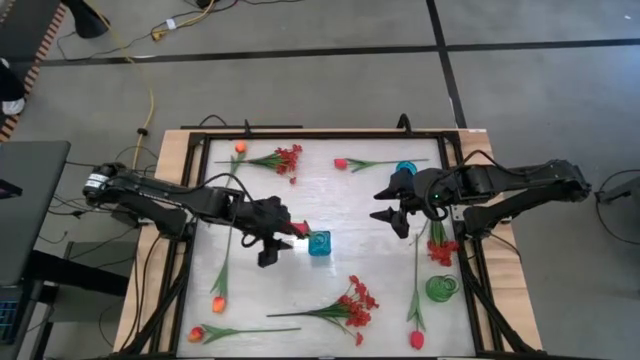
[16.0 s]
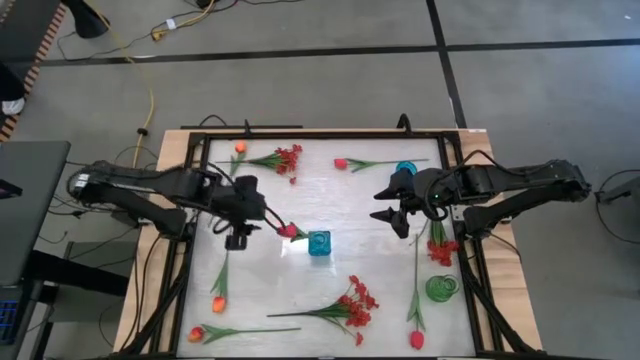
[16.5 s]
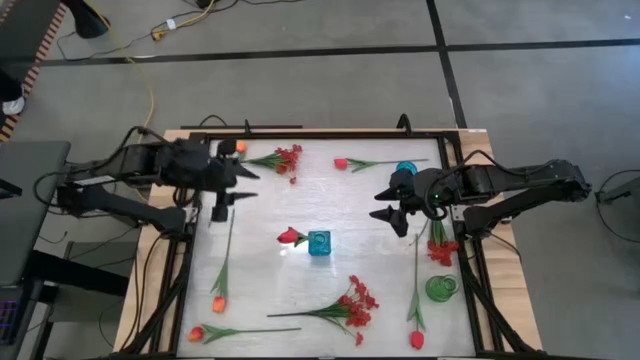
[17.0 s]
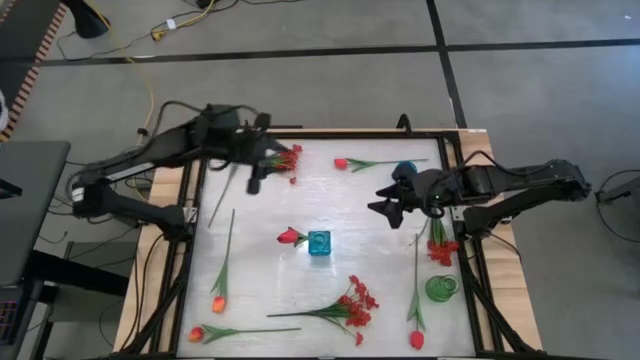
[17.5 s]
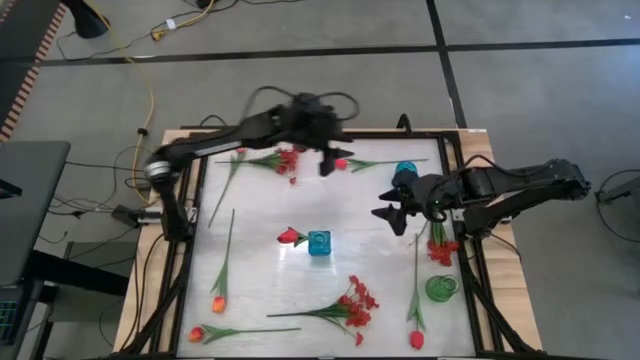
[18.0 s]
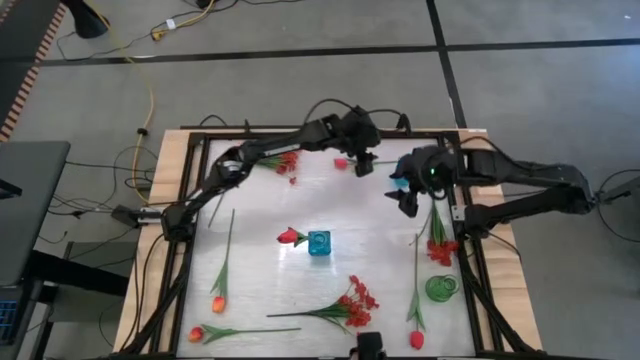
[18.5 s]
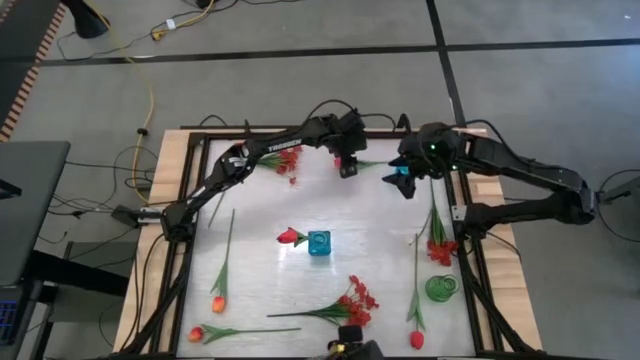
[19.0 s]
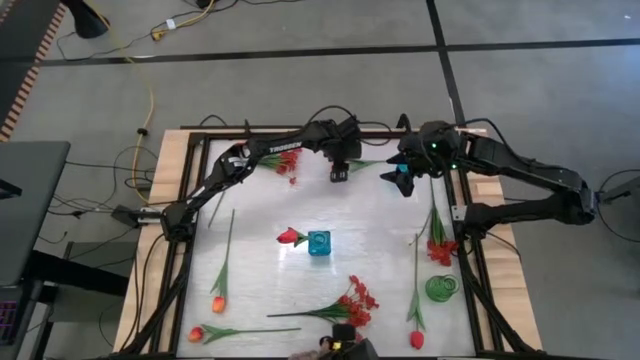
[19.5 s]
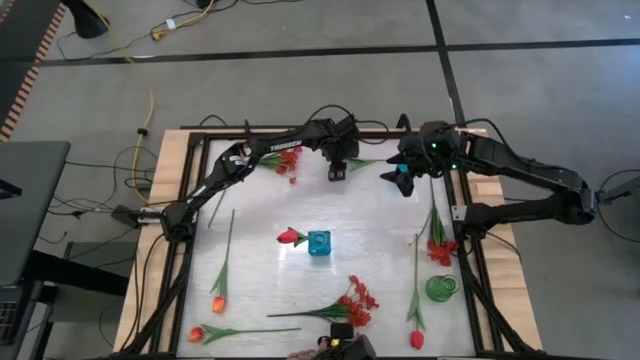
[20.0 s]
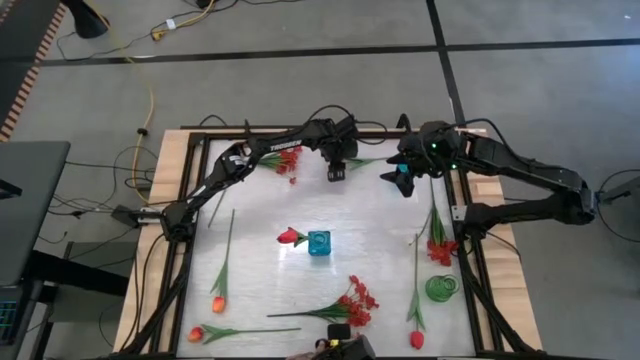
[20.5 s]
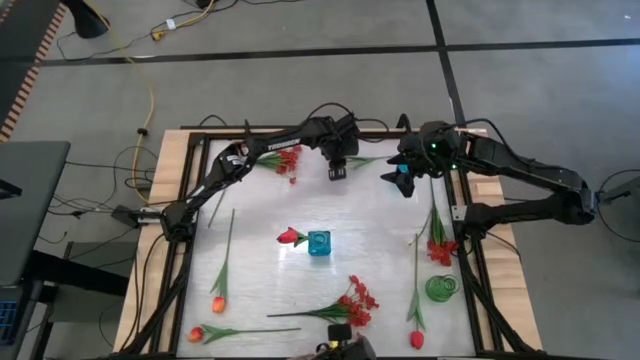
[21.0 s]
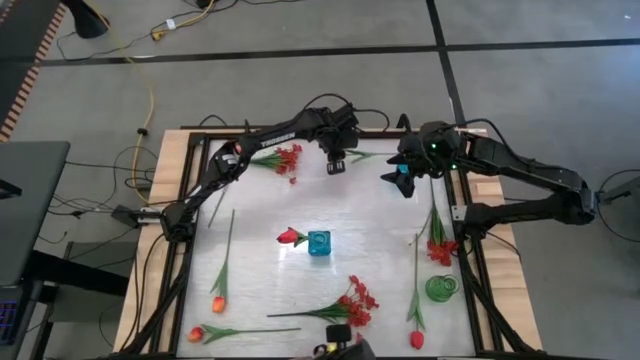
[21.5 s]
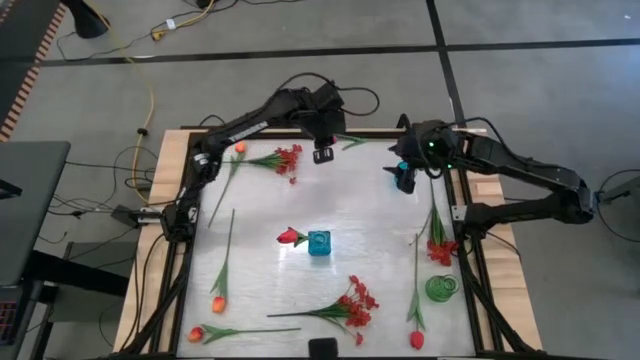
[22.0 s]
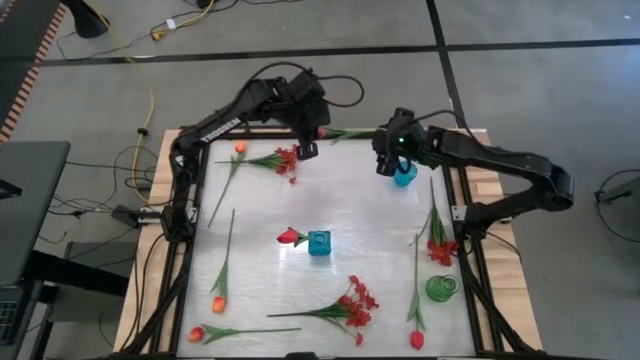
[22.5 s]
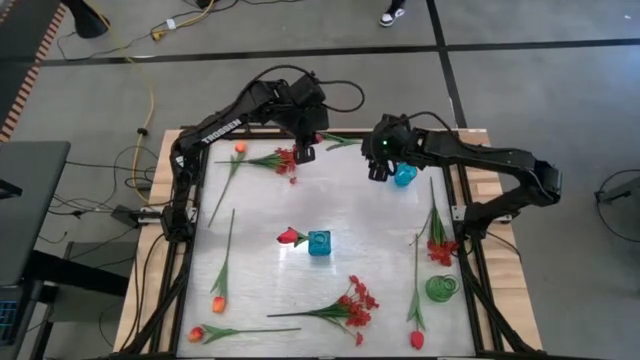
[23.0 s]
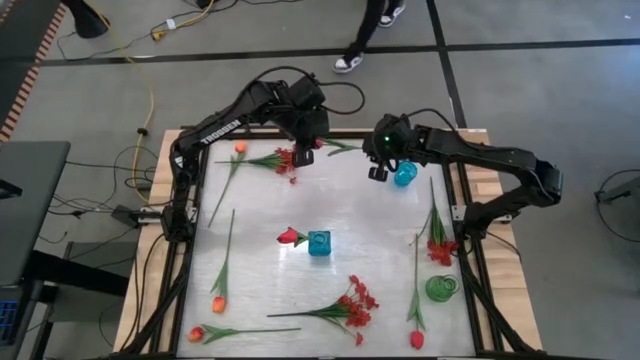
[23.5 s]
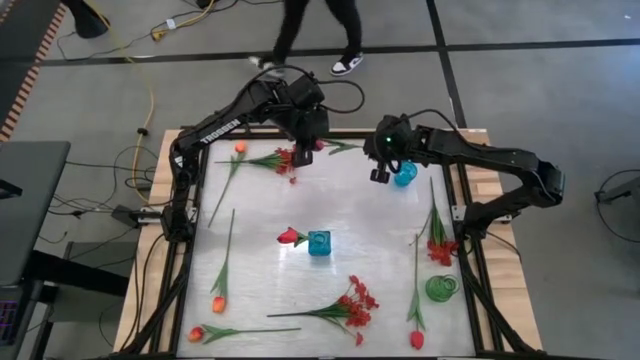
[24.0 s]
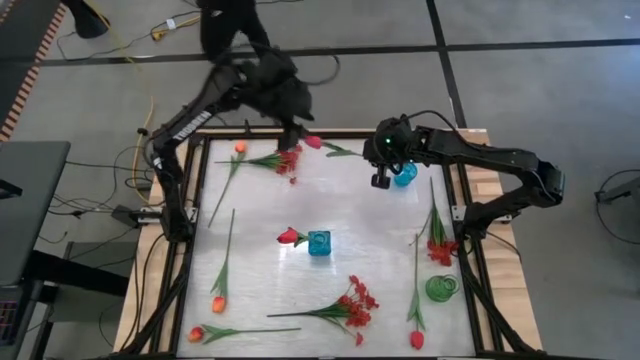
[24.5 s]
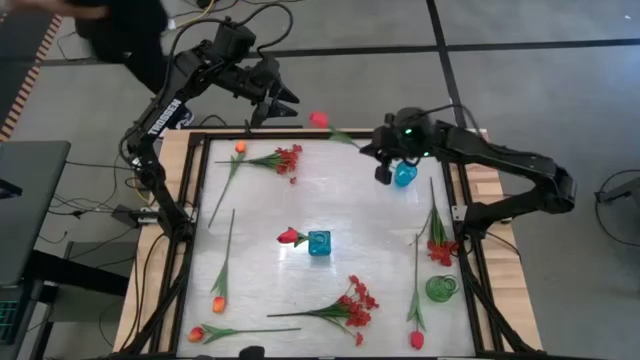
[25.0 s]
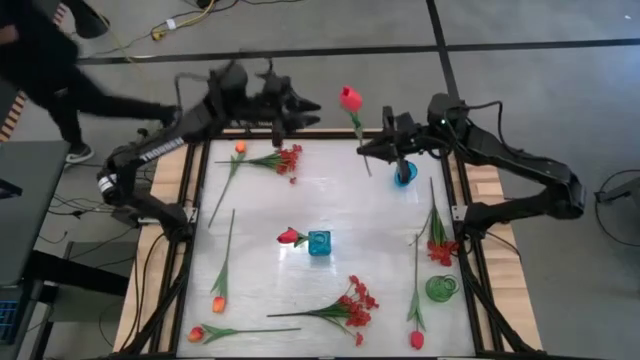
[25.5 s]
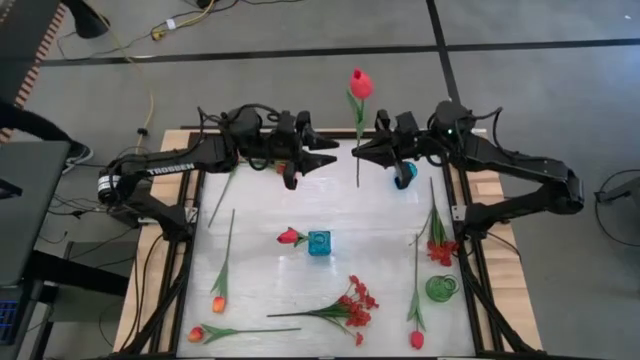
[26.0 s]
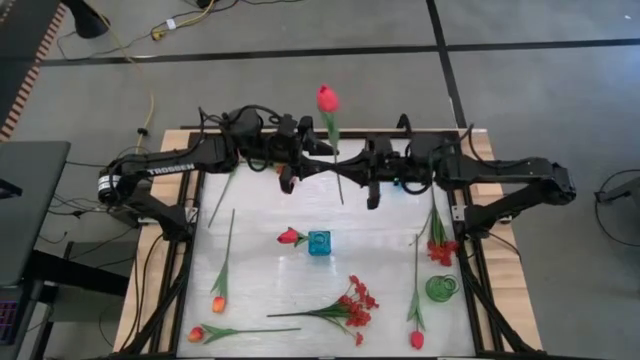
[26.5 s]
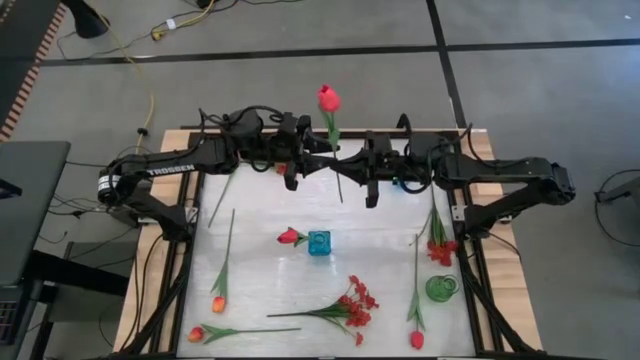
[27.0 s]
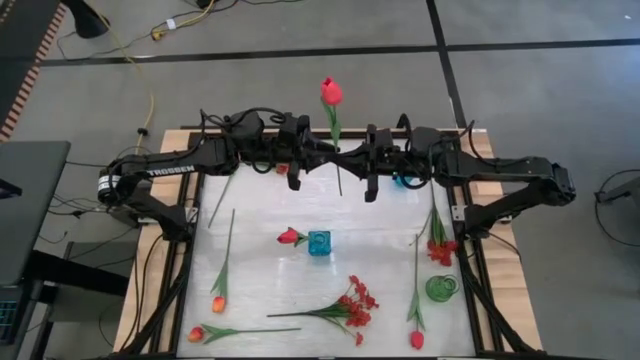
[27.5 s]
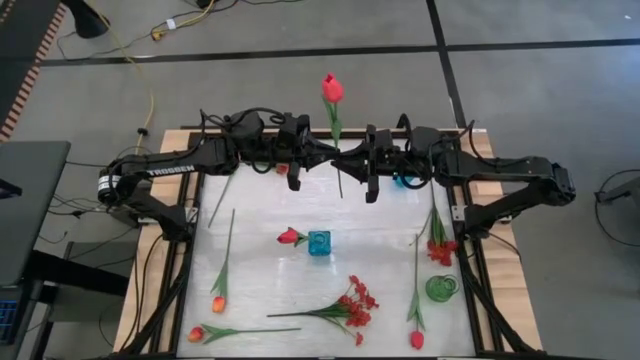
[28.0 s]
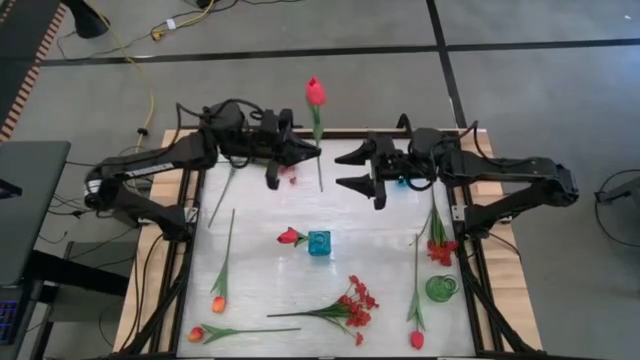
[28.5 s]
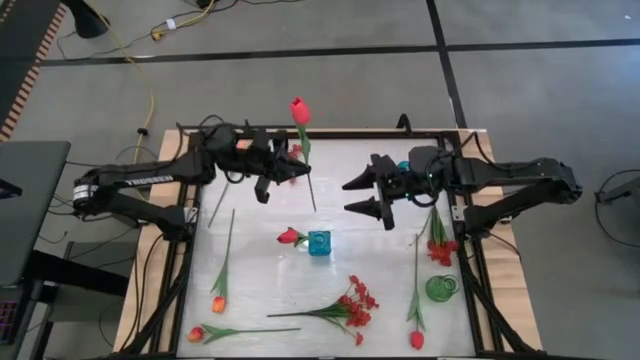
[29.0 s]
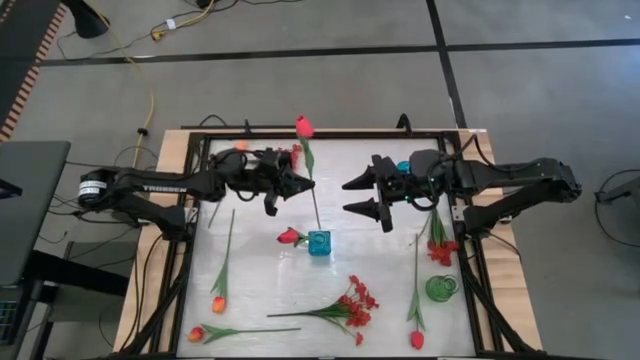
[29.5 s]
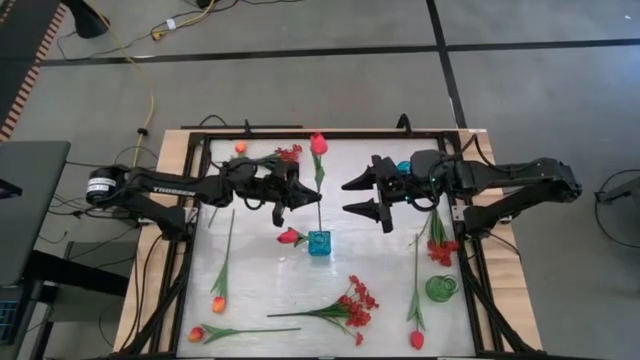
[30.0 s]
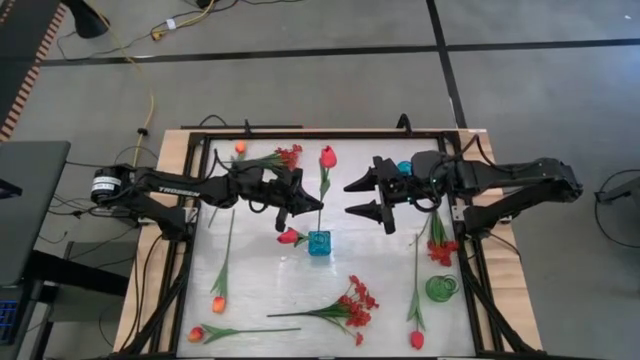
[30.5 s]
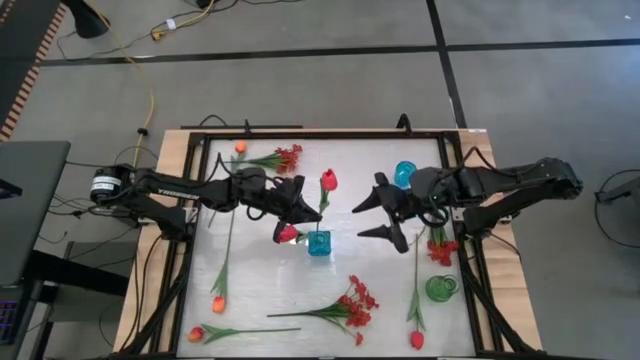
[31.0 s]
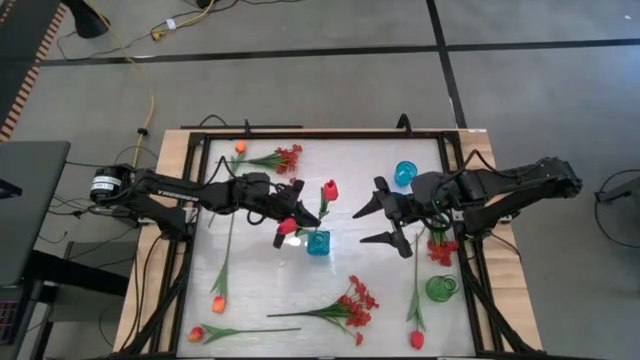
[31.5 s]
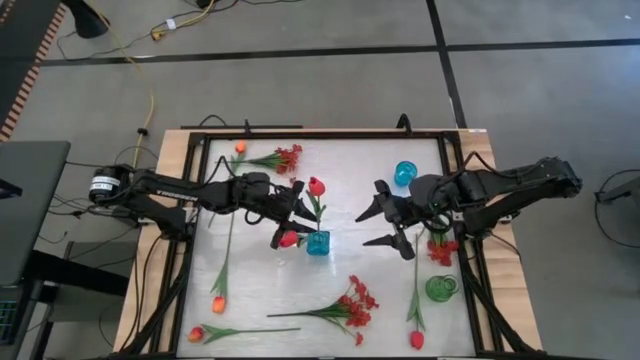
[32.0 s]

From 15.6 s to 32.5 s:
Task: Sort flowers into vase by color
Put the top pink flower into the bottom blue vase

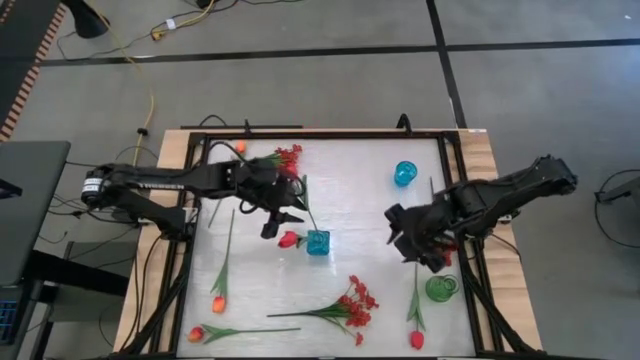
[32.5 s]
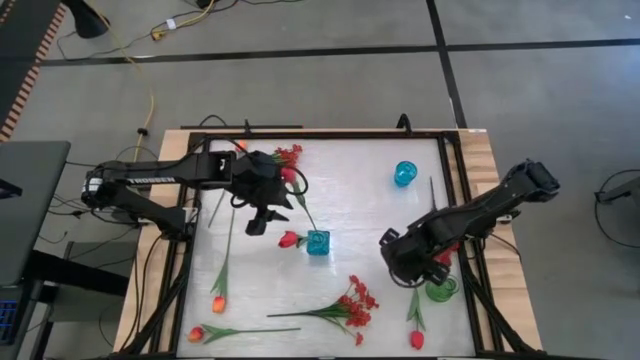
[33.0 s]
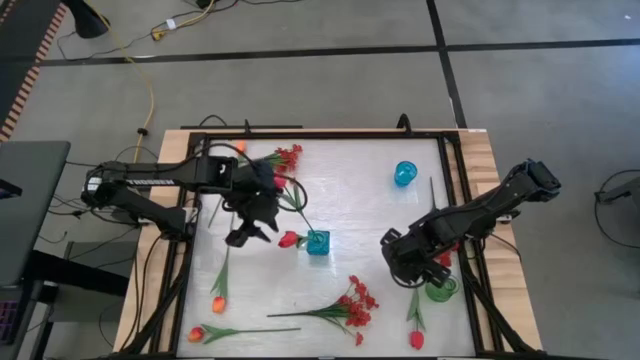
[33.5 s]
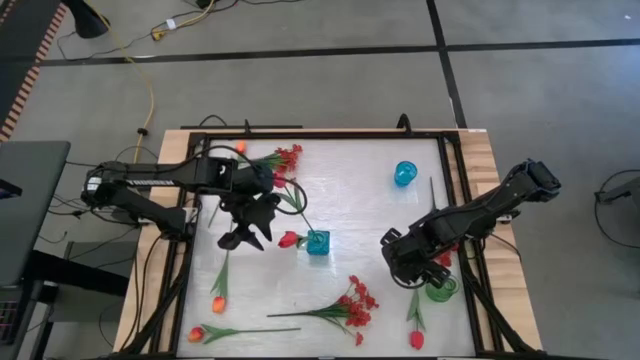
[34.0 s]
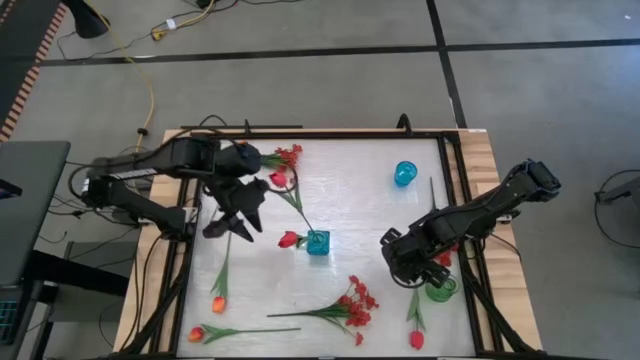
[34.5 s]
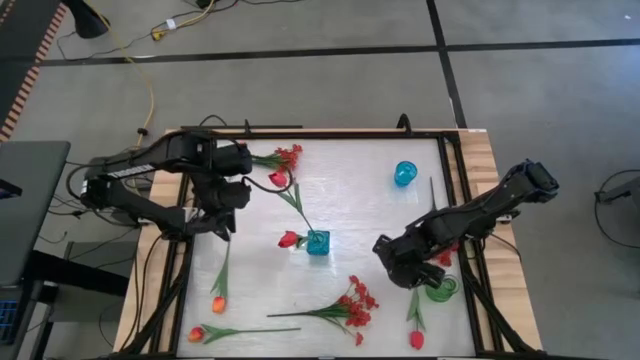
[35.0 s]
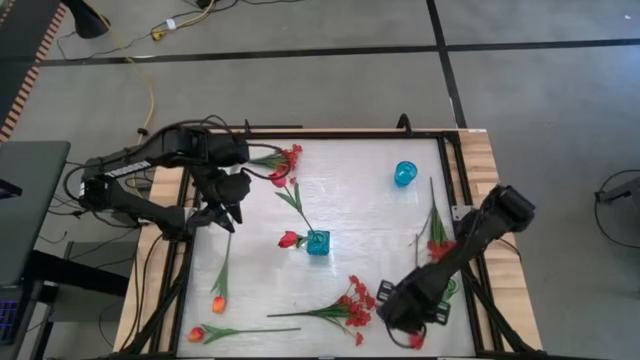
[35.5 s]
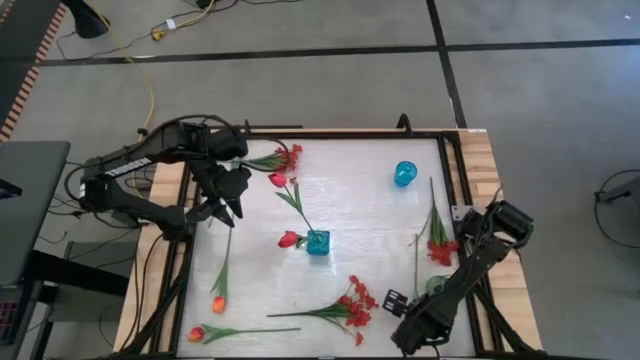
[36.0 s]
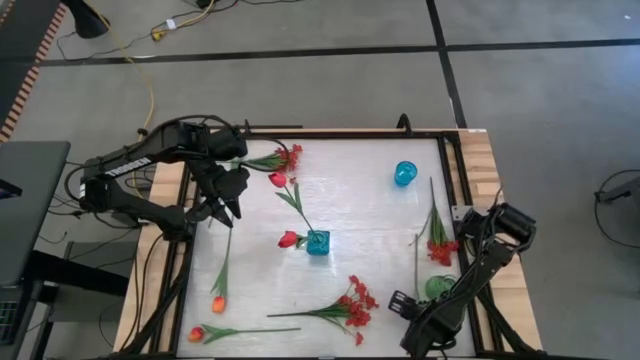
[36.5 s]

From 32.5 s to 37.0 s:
Put the pink flower into the bottom blue vase
